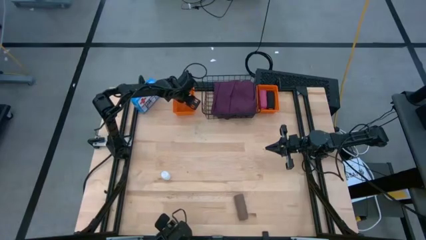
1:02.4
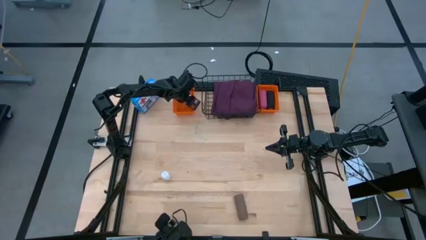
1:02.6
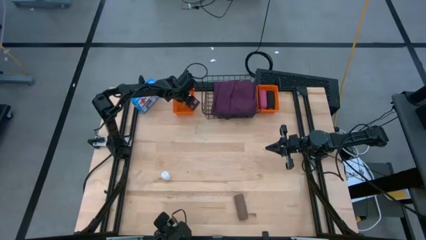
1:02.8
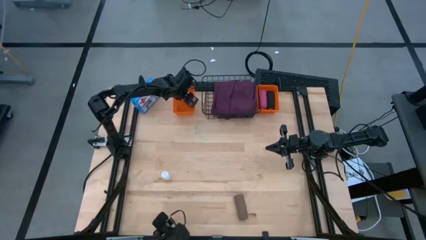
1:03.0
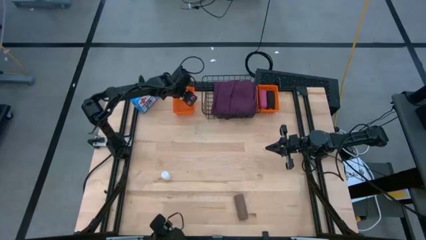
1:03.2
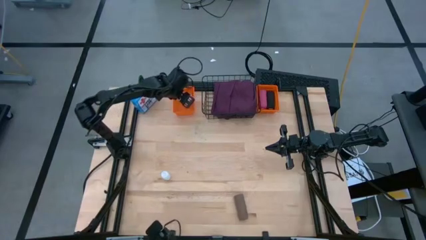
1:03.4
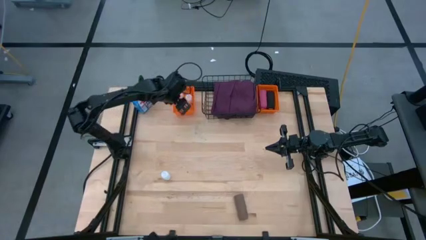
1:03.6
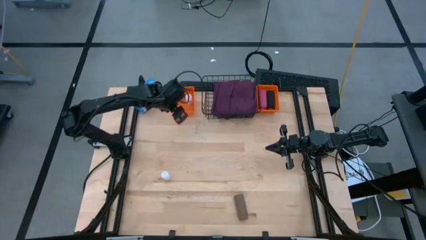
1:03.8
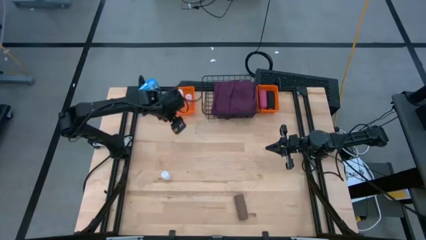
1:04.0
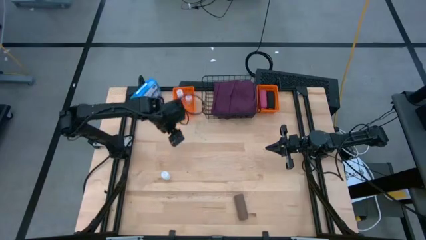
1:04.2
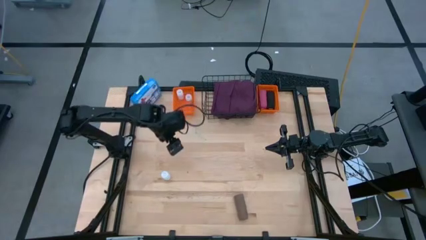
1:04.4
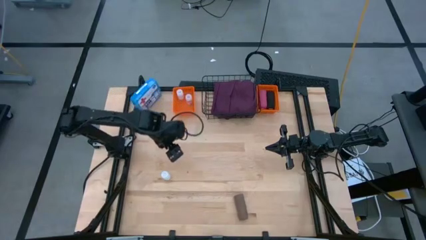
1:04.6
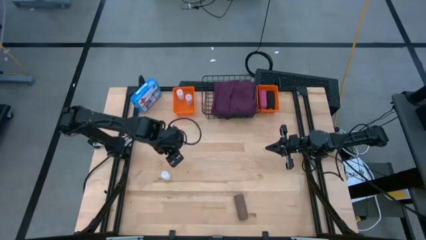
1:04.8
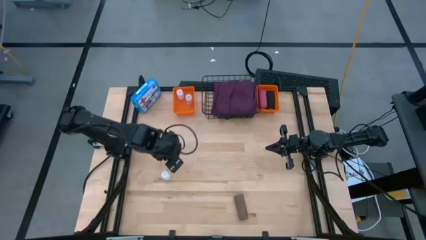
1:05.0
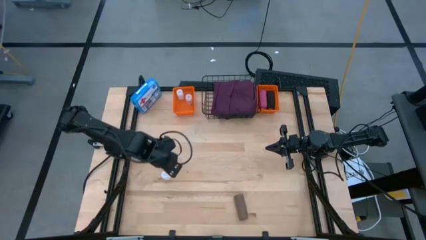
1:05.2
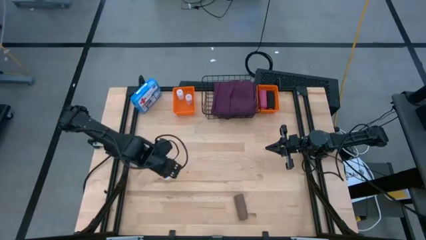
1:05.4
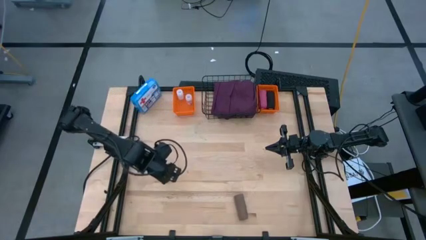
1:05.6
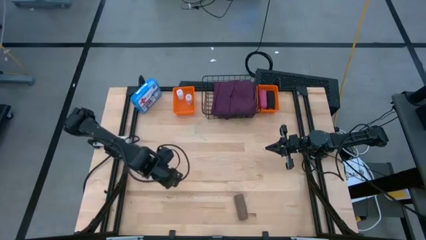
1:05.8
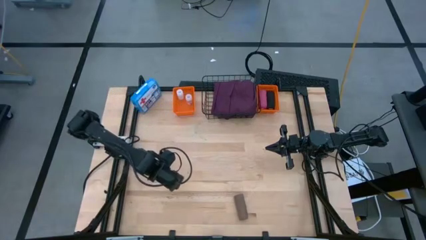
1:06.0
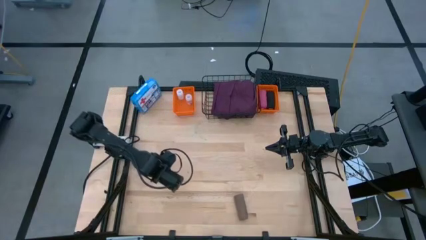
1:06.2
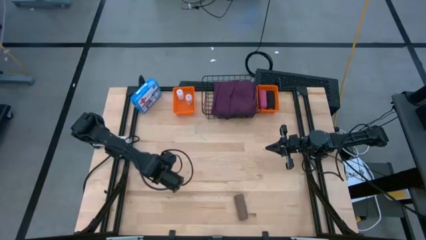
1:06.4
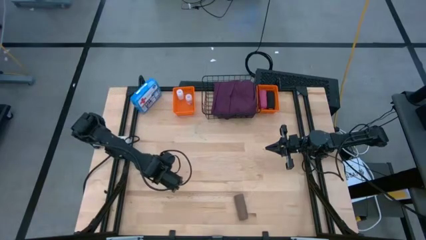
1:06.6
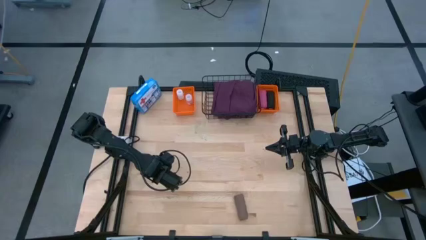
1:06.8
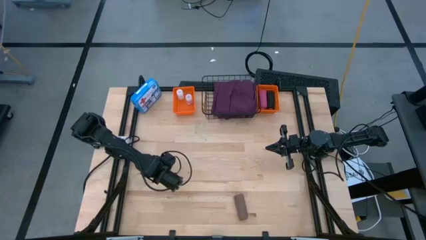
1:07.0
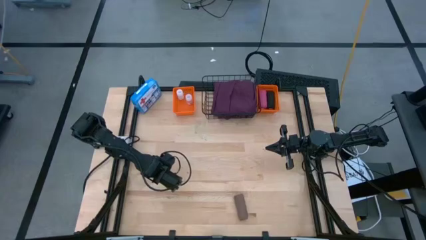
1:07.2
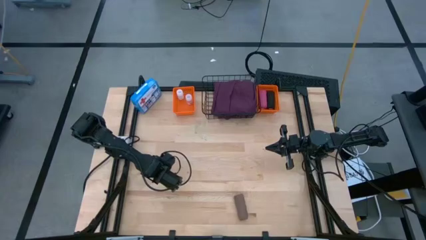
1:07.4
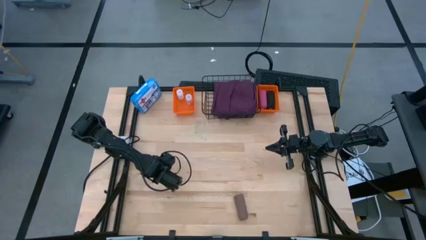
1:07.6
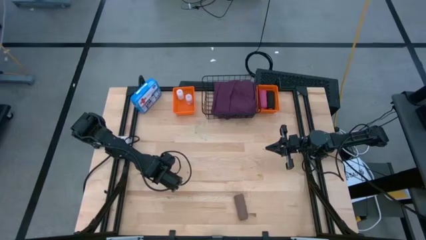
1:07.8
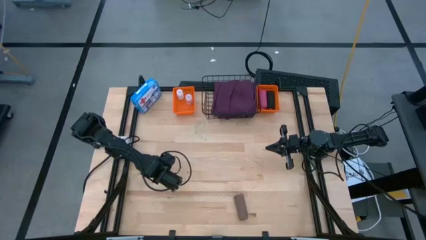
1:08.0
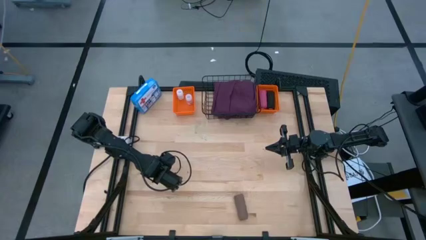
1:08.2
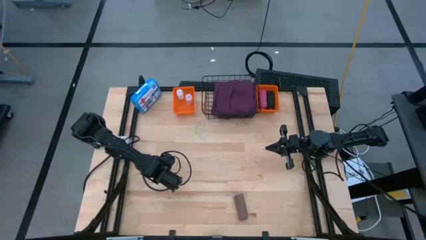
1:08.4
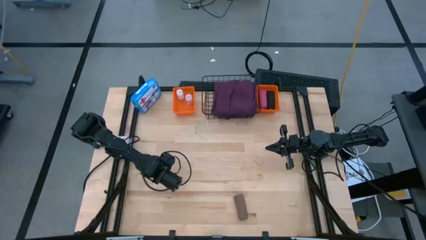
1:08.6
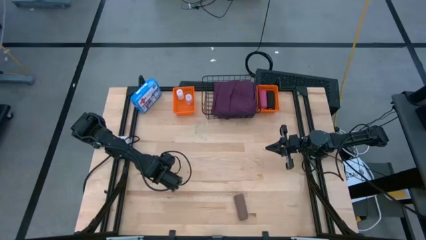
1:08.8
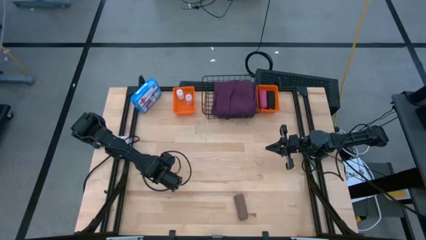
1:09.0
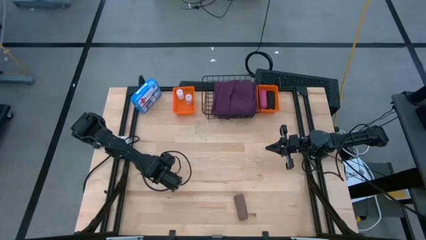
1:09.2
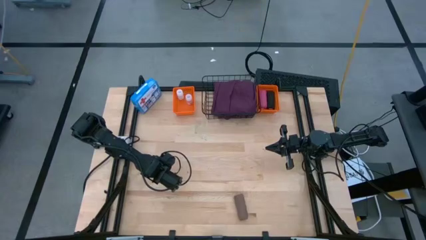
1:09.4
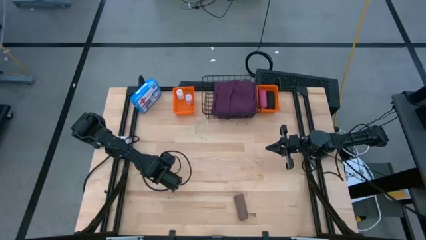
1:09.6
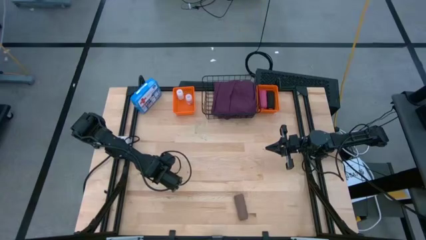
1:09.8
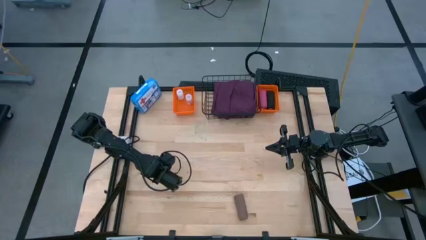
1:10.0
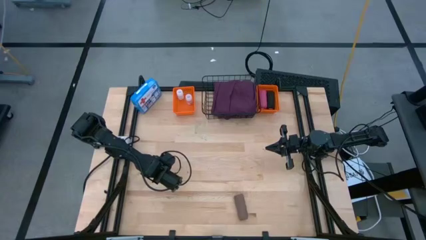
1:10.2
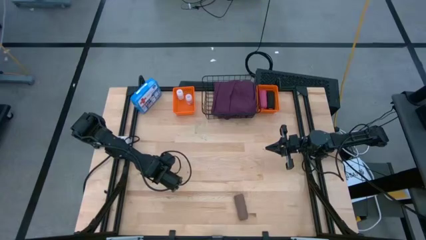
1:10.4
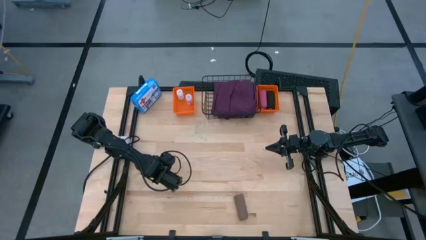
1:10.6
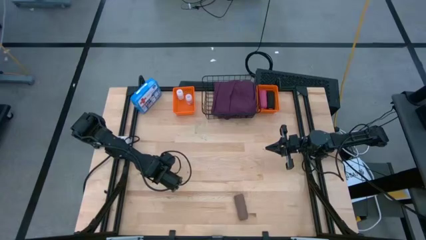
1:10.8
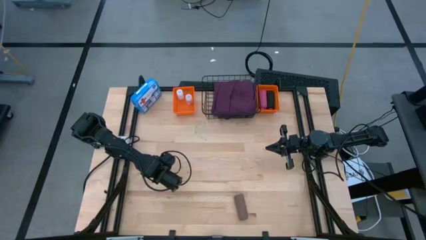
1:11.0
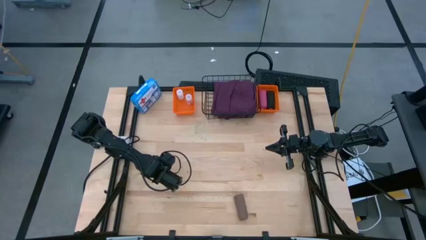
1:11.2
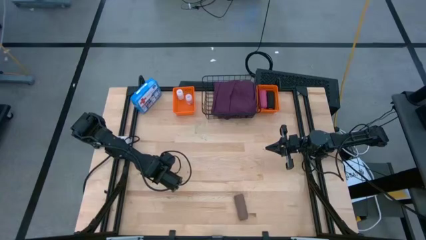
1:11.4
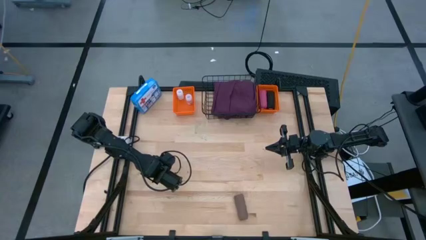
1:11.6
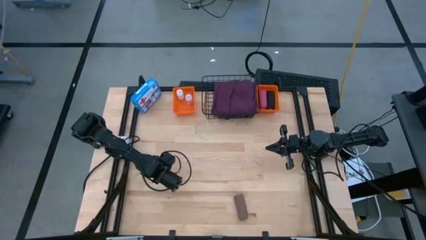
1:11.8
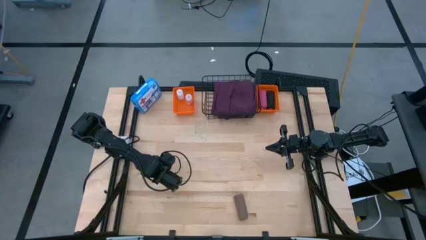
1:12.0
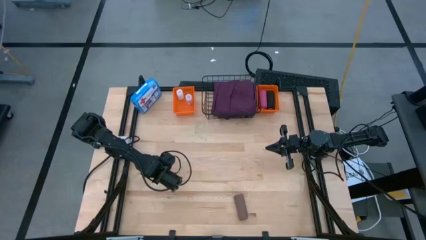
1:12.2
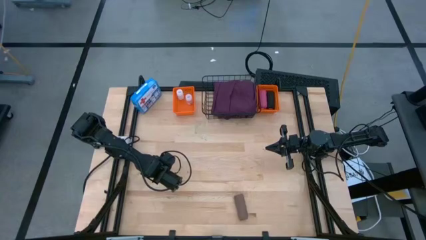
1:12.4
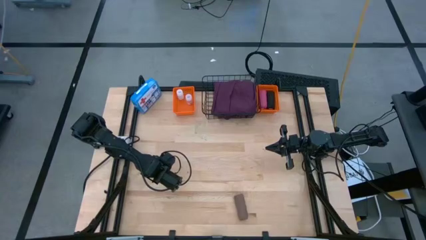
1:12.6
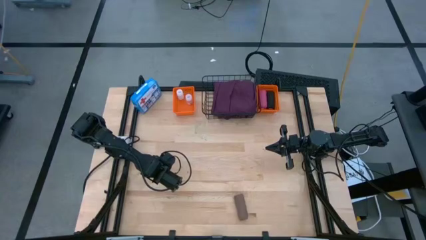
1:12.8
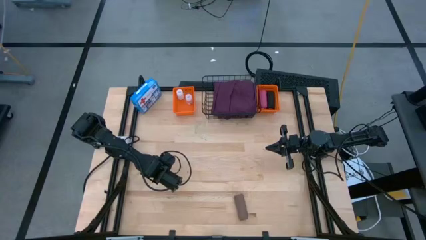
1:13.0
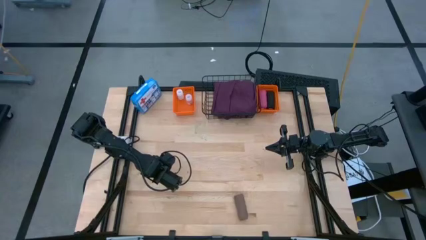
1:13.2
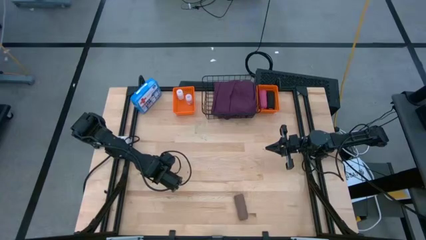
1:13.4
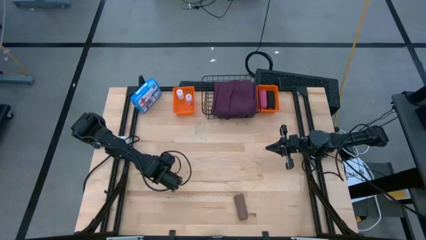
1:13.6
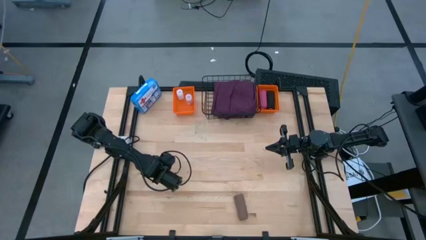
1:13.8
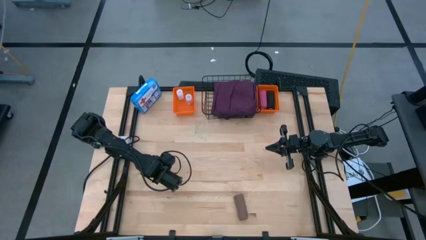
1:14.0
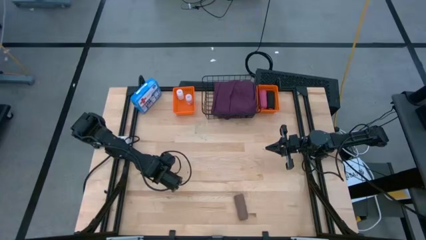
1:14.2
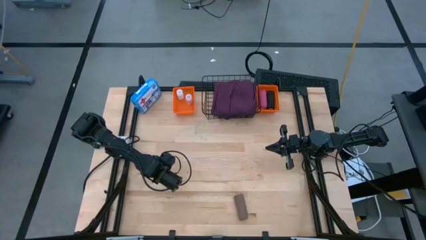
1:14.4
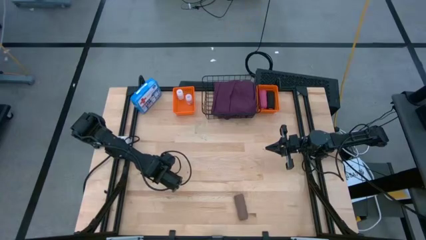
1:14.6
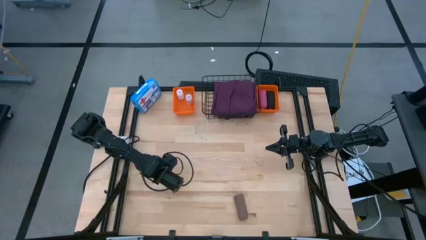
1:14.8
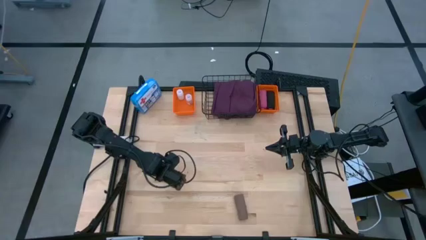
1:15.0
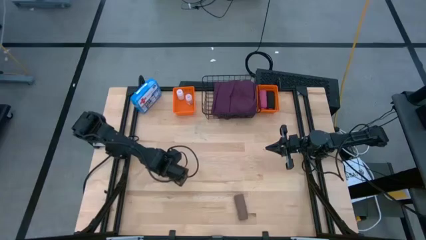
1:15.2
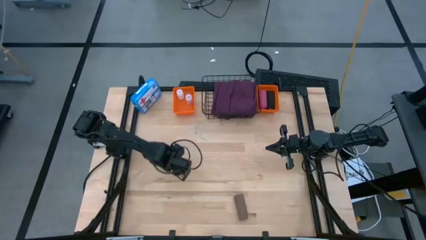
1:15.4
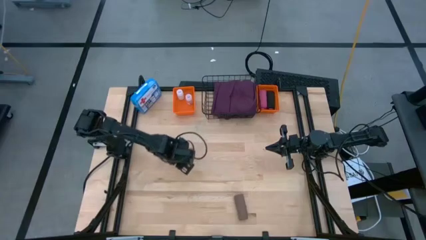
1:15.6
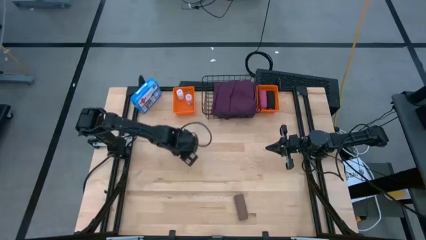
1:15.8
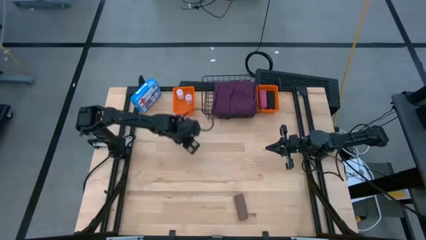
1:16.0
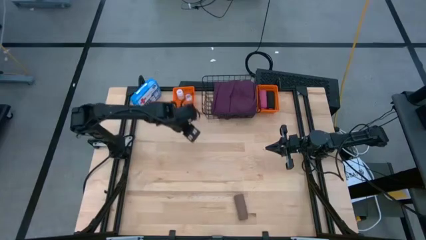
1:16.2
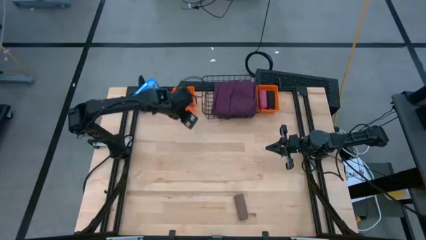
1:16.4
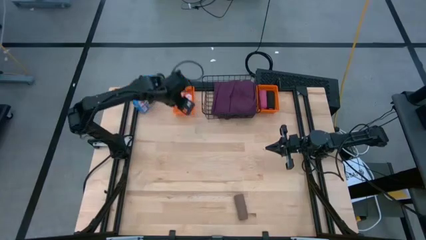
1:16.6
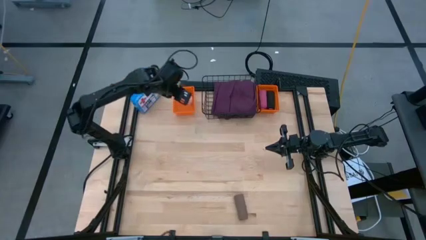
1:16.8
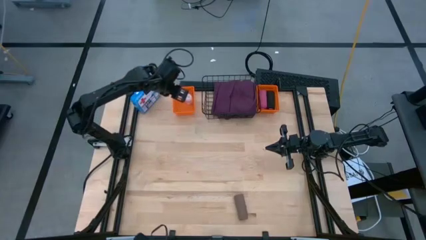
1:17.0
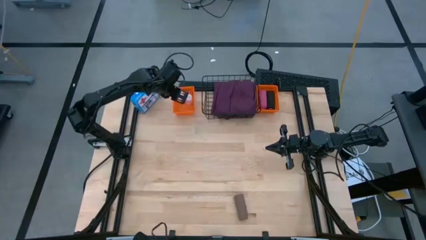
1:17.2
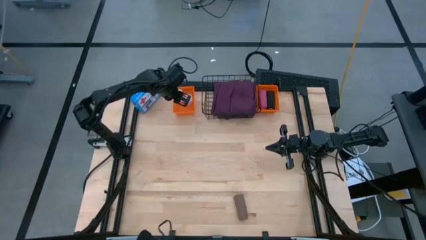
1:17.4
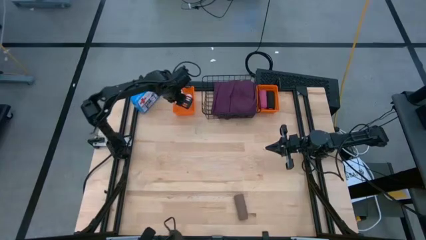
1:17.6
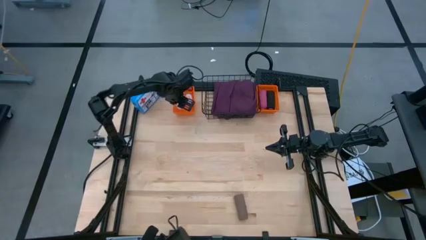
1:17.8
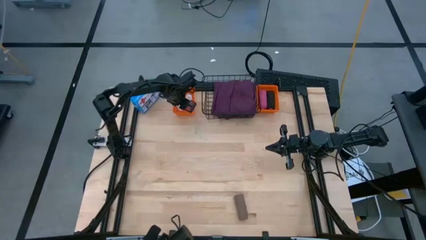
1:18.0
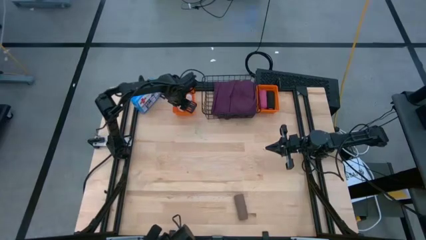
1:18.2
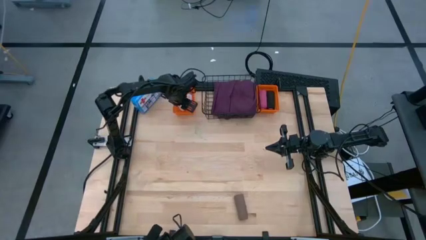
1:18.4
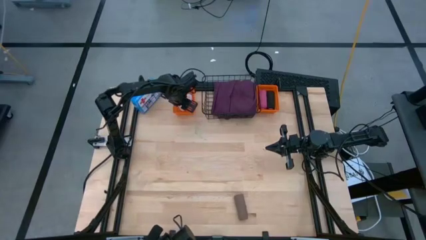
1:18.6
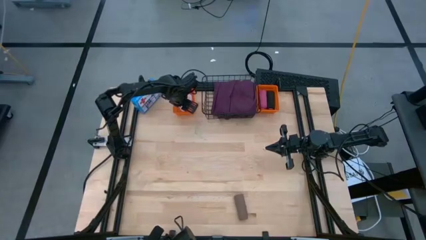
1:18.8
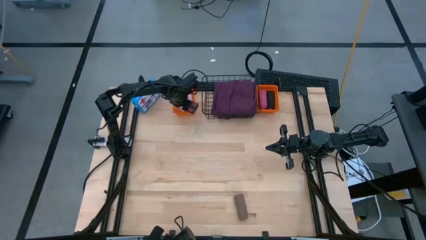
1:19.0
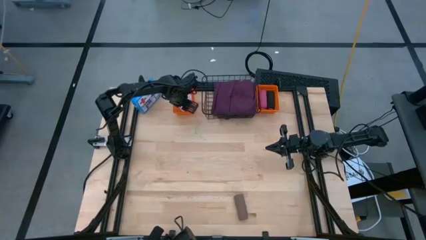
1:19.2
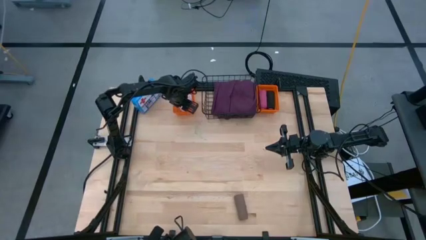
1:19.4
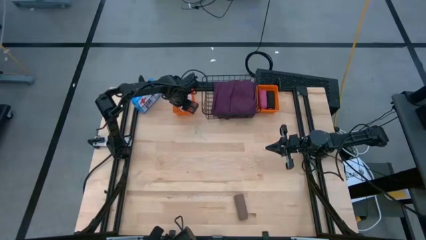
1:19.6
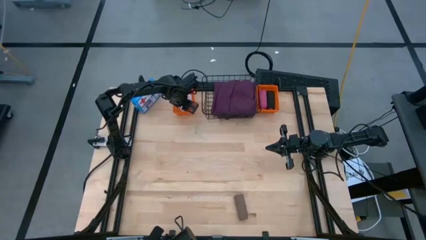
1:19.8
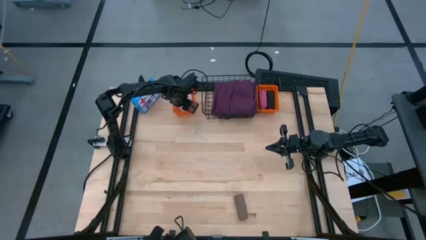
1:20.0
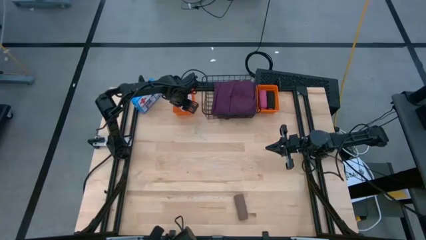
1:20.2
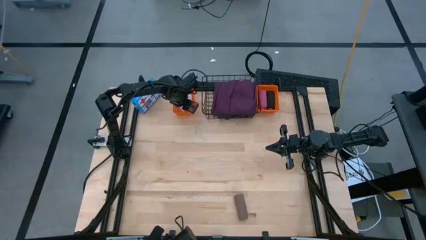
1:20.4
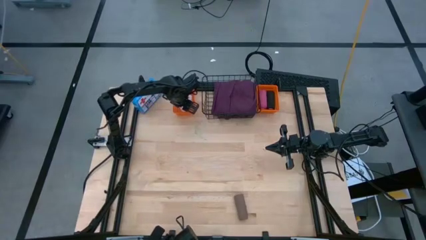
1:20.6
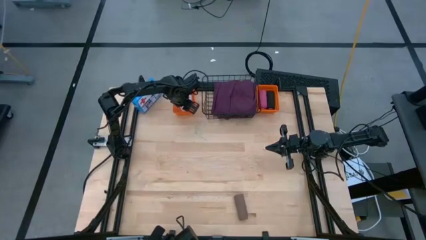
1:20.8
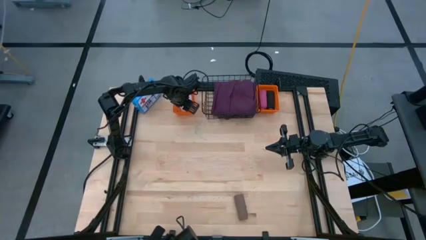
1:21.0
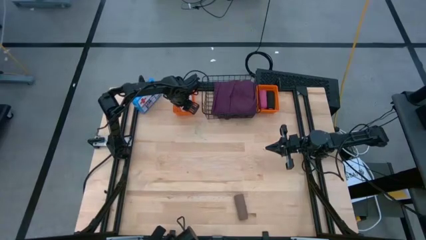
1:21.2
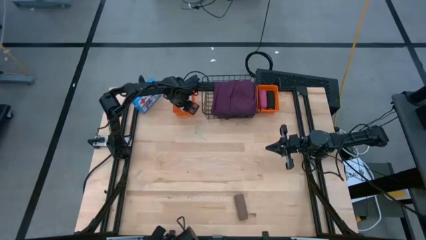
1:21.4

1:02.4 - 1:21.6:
Task: Pick & place medical supplies in basket/bin
Put the white pill bottle into the left orange bin
